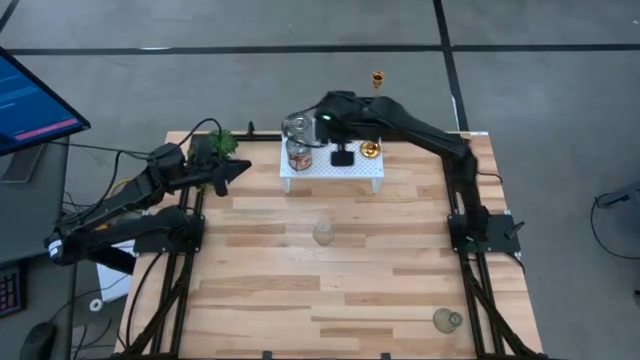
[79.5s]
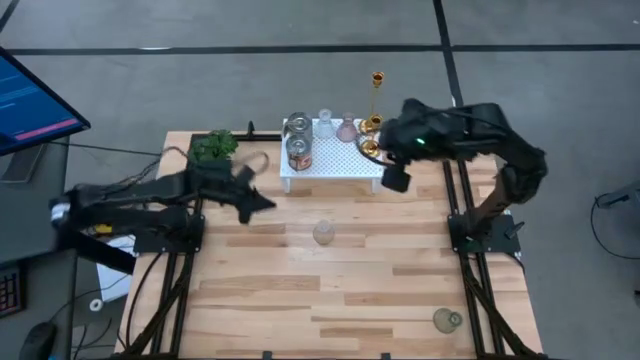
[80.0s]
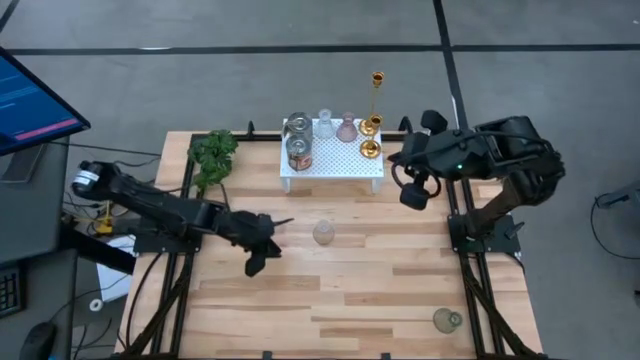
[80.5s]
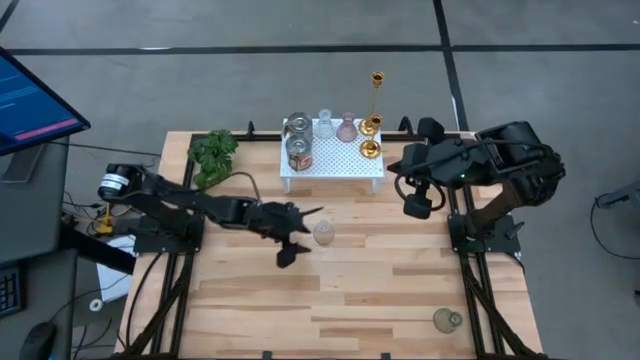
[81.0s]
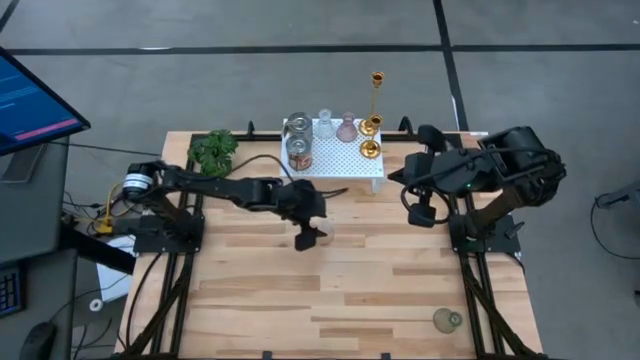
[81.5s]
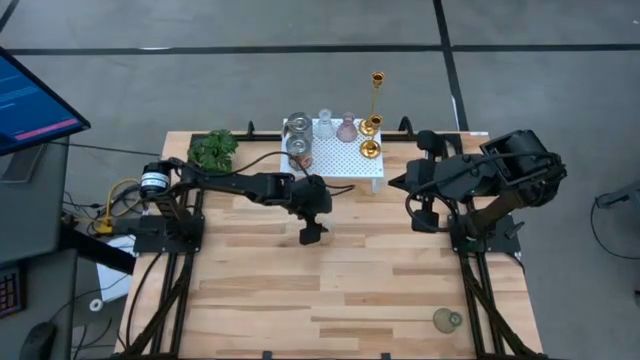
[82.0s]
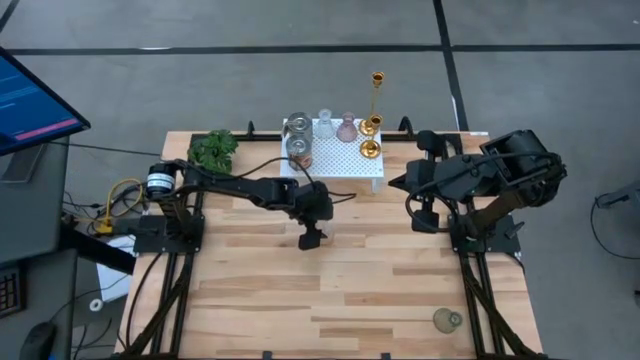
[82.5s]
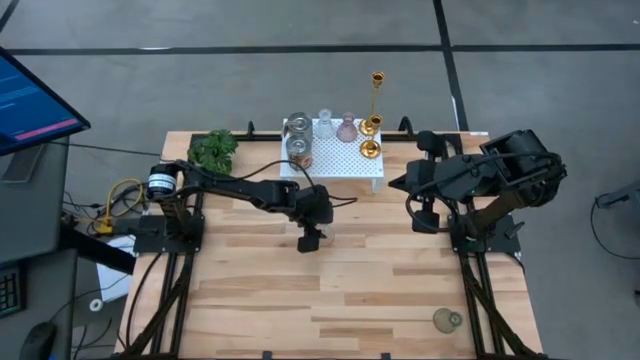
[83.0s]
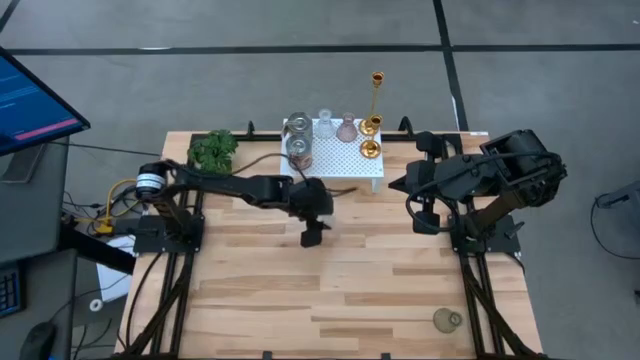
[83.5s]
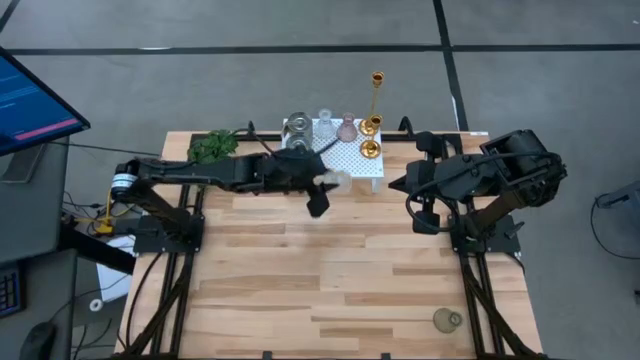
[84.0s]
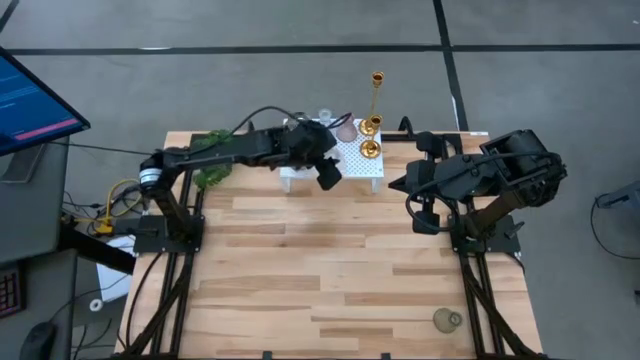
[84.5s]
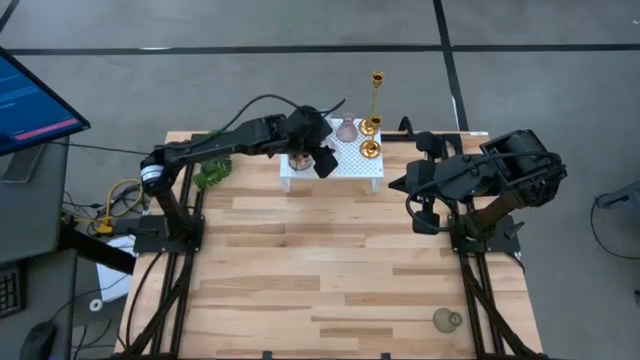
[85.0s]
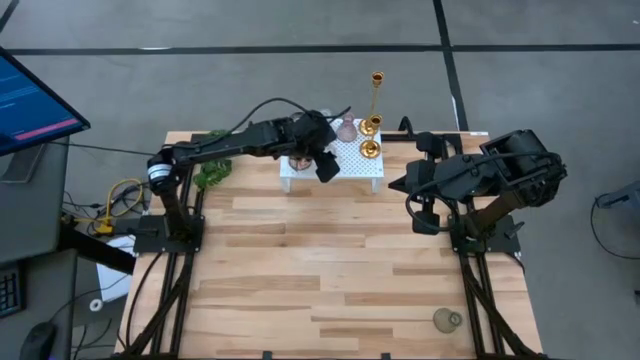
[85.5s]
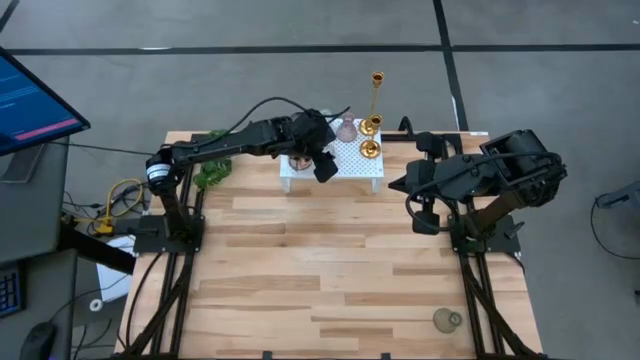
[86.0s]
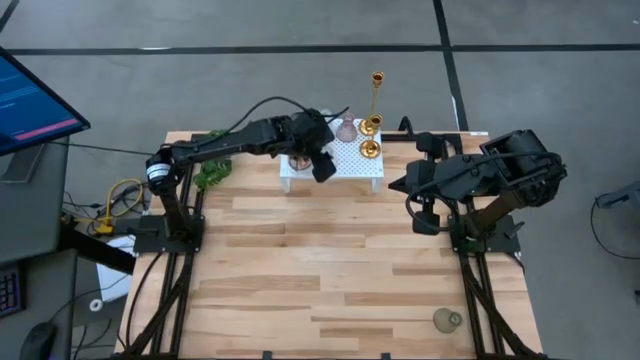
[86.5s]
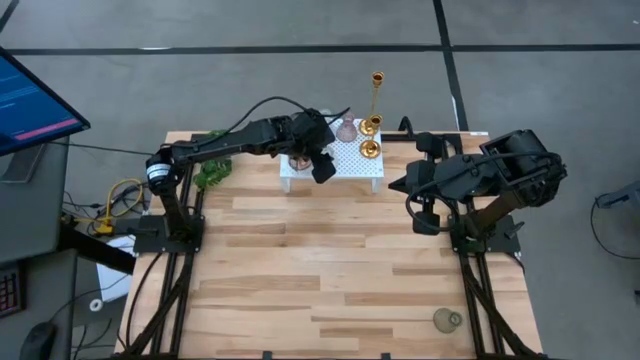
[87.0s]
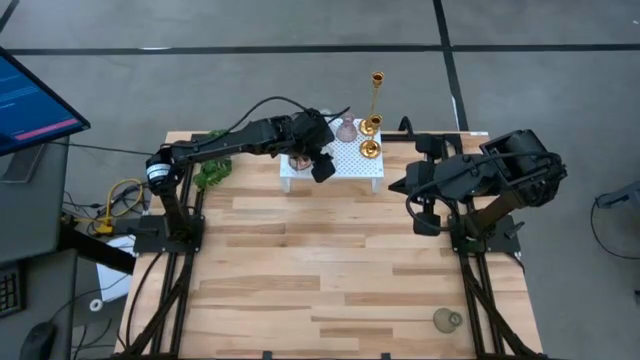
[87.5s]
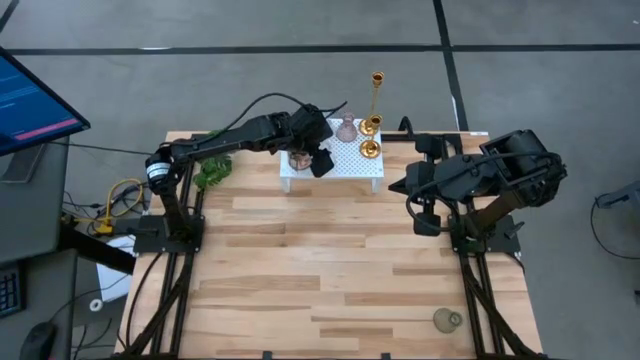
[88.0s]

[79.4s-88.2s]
Task: Pick & Place candle stick holders
Put the transparent candle holder on the shelf

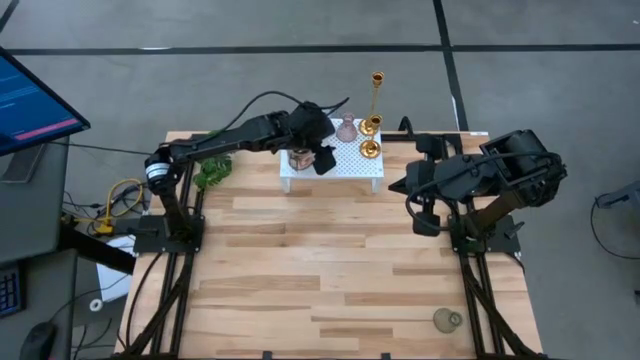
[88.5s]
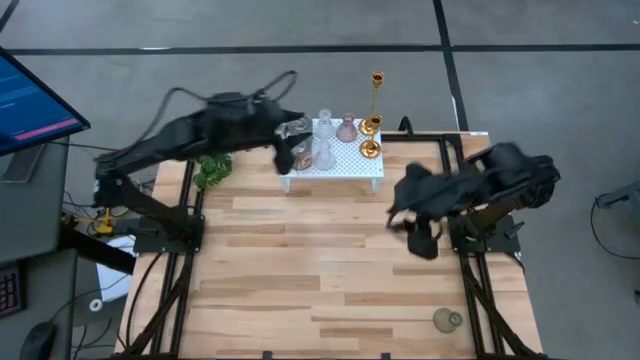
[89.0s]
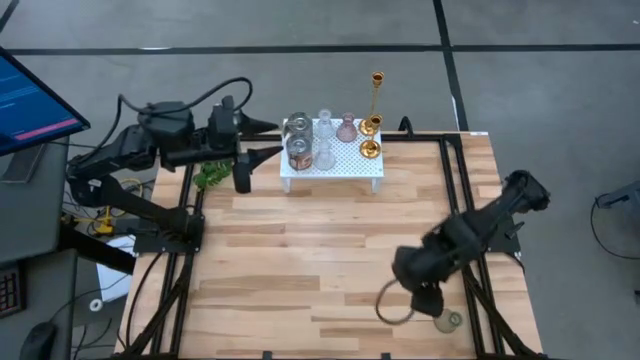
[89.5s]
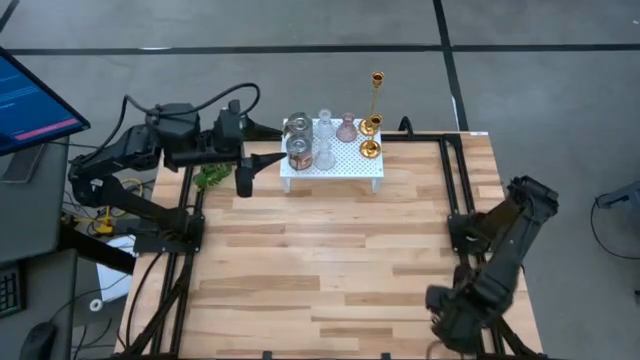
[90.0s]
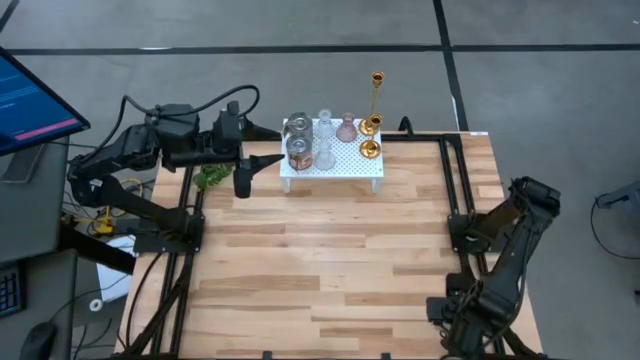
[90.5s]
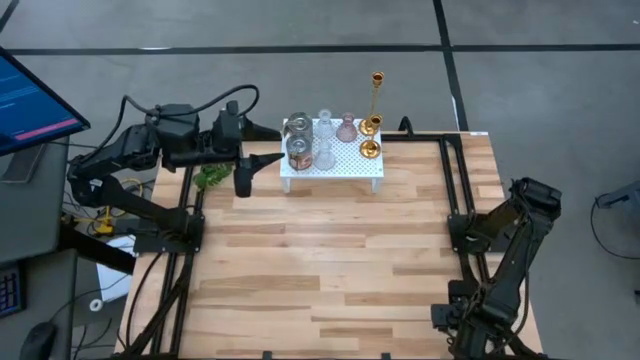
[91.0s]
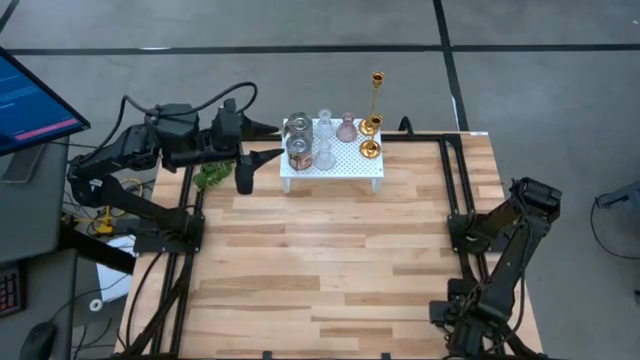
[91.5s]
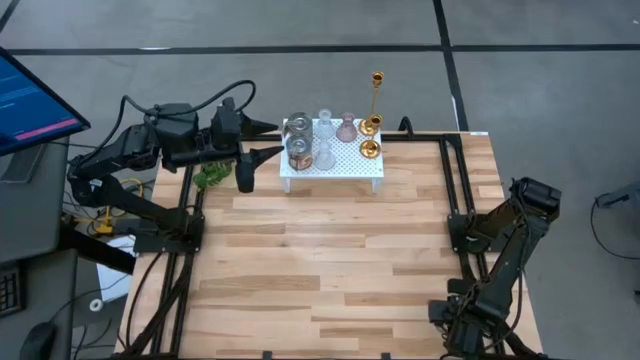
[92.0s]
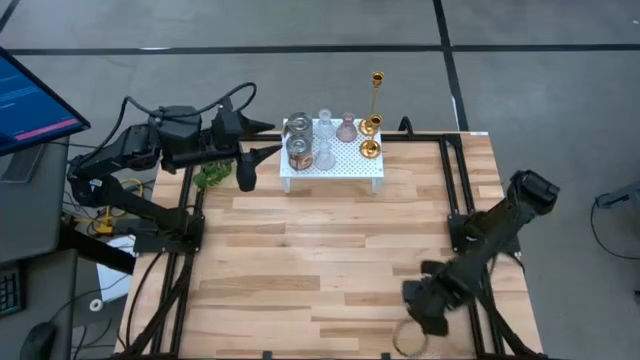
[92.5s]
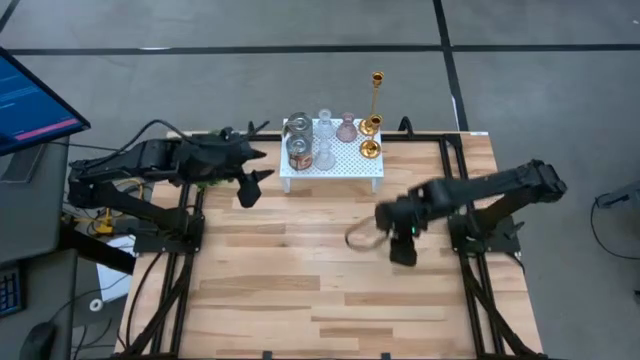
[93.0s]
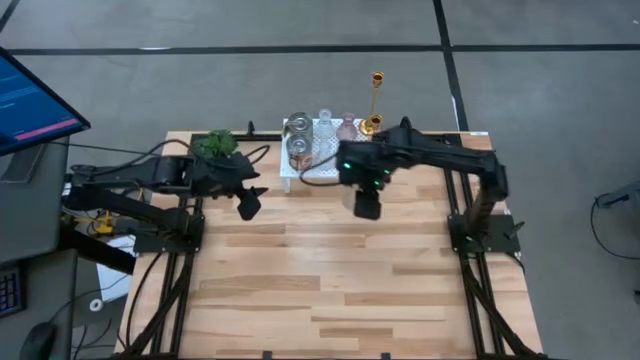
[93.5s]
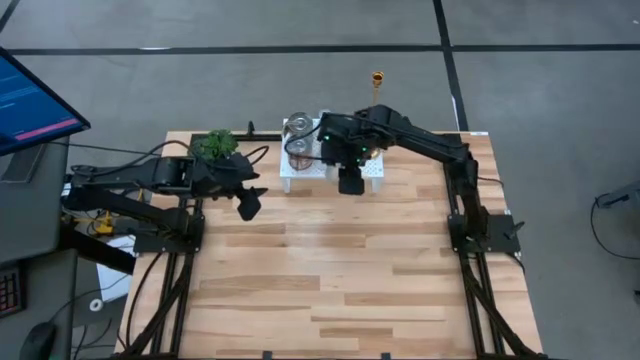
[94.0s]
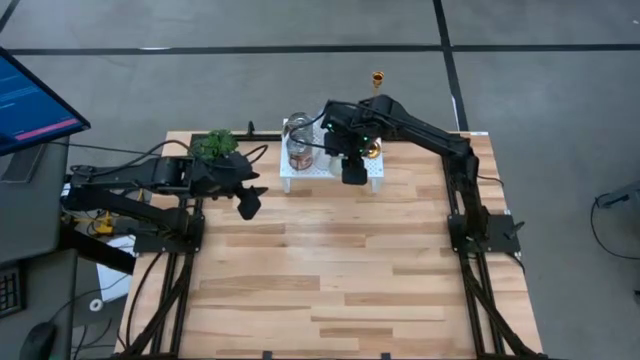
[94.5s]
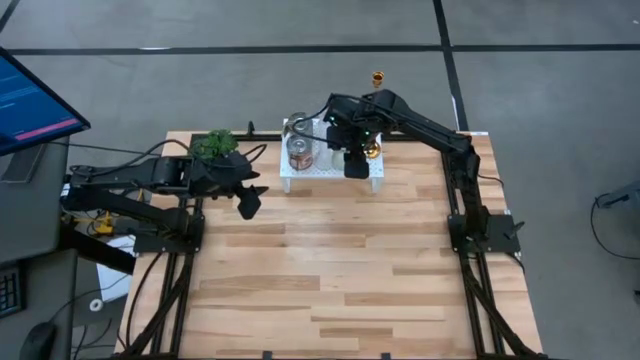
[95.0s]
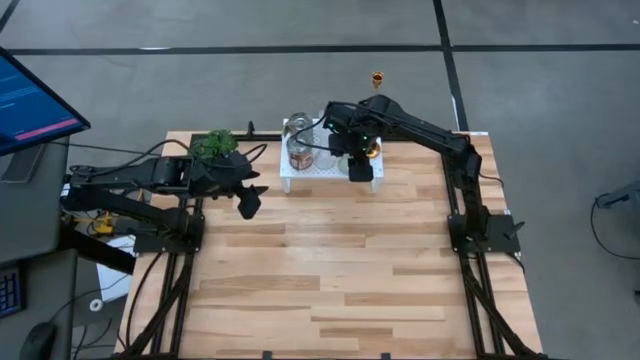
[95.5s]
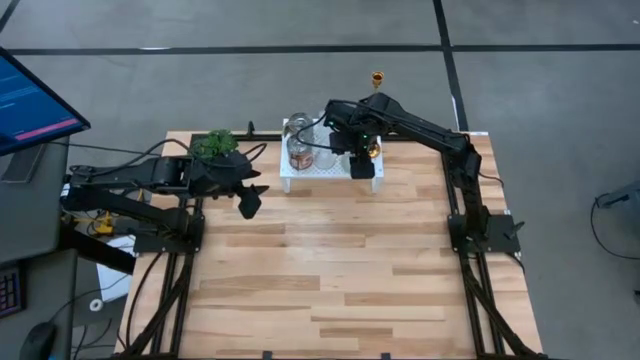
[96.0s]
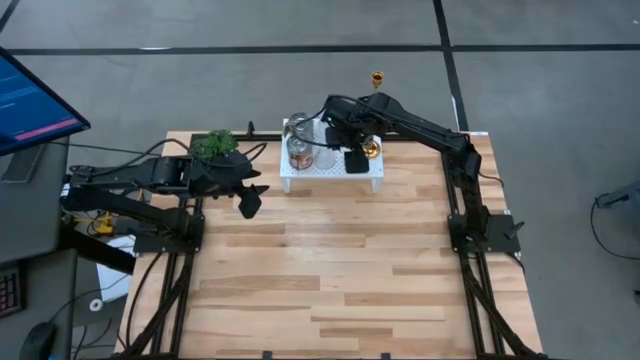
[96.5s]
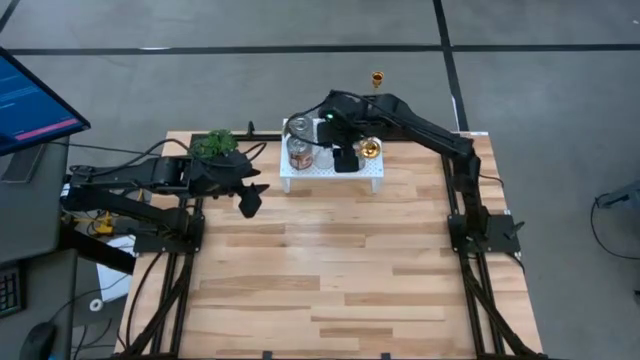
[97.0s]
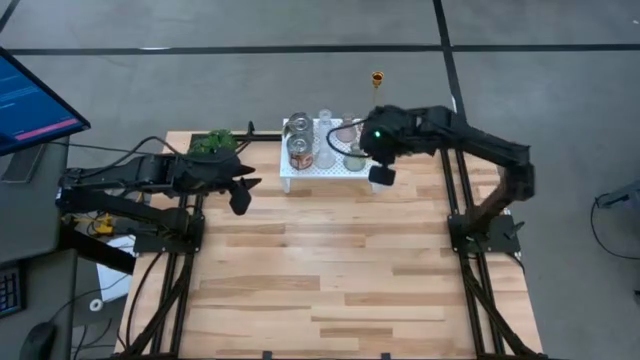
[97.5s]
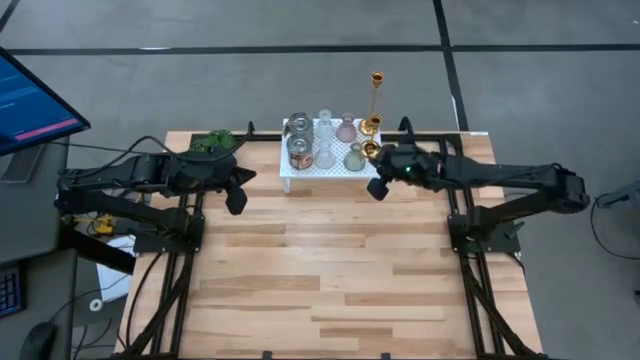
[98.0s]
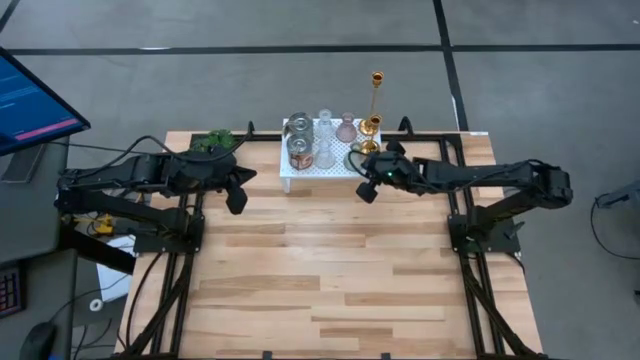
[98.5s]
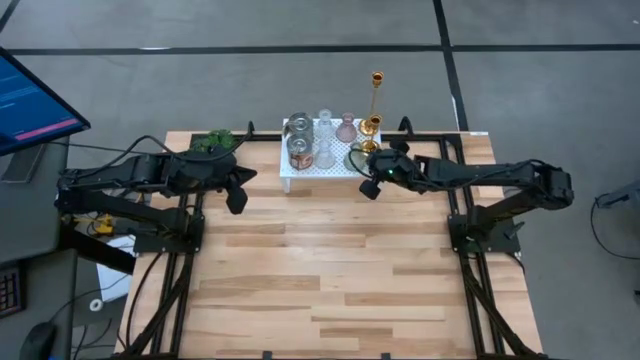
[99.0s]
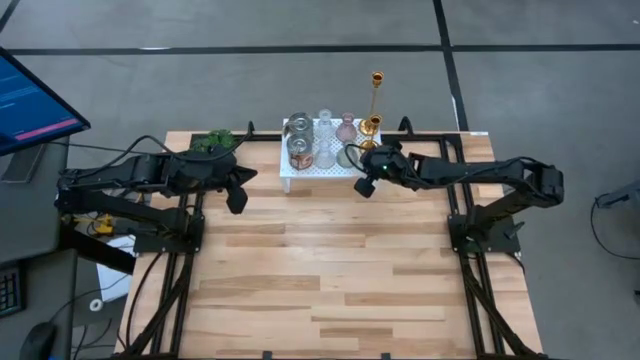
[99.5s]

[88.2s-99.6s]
Put the green candle holder on the shelf

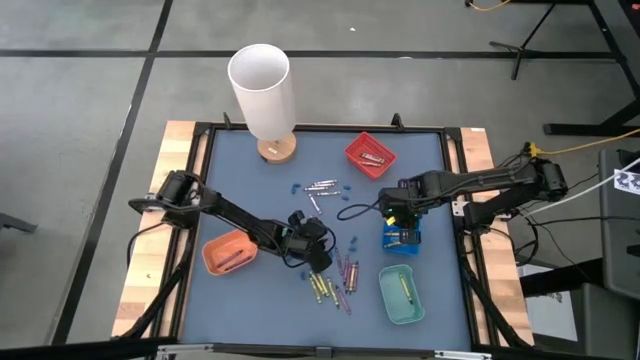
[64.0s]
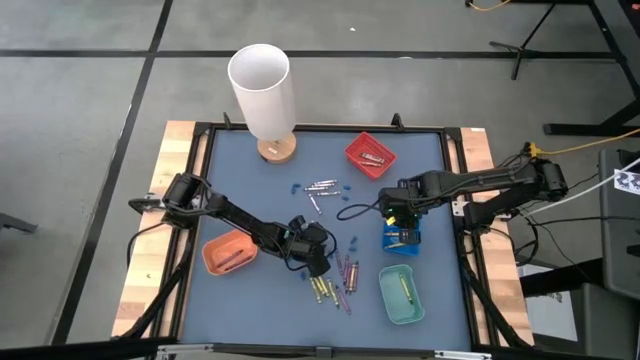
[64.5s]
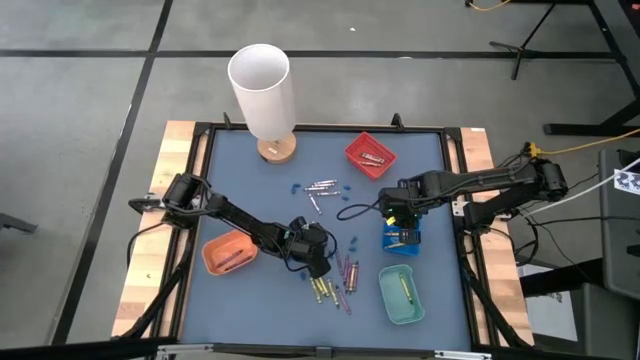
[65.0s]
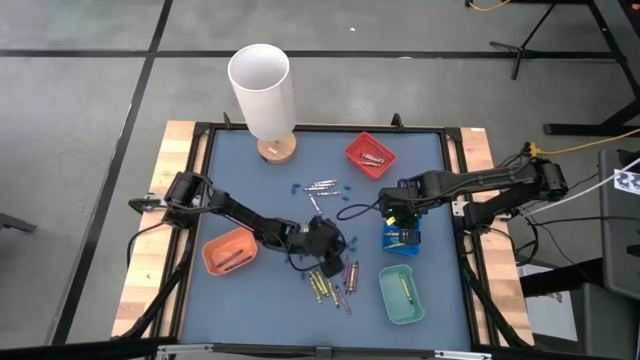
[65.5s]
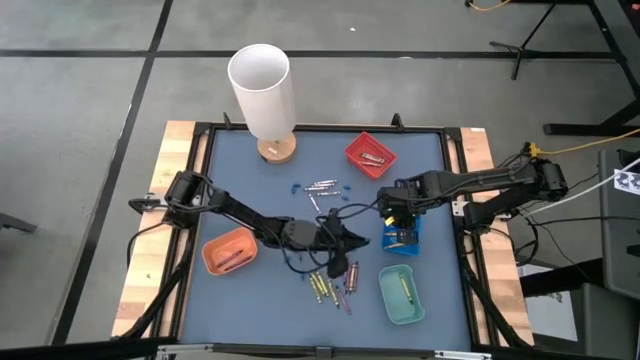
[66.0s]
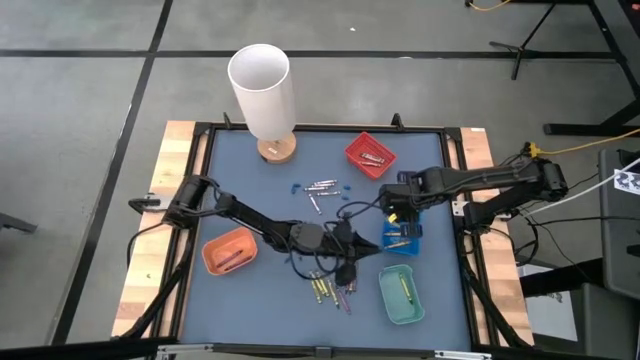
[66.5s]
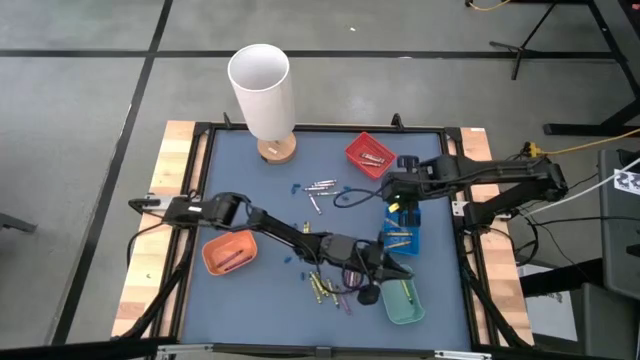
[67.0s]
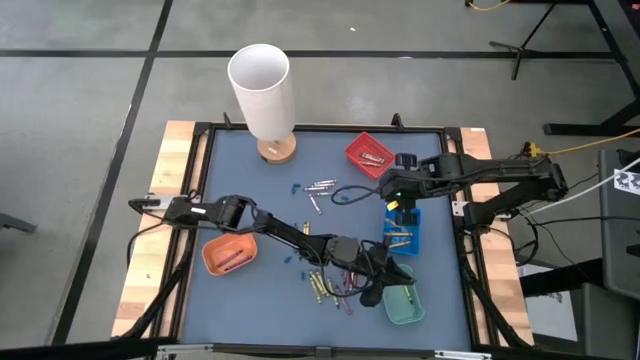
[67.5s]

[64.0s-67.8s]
Task: Sort crayons
Put the green crayon into the green bin
